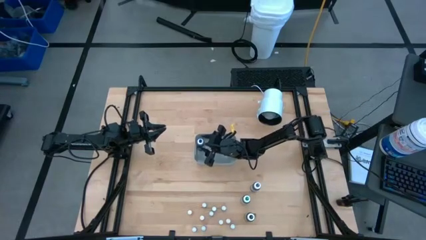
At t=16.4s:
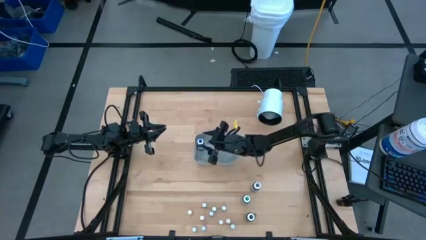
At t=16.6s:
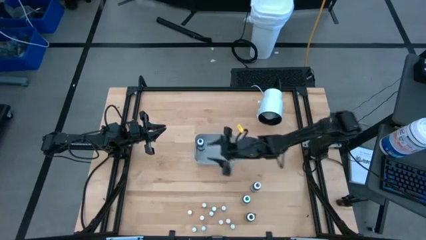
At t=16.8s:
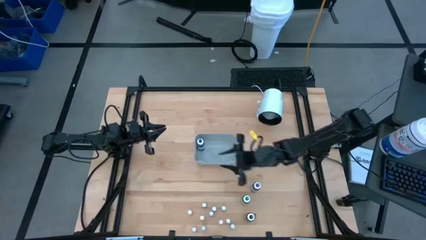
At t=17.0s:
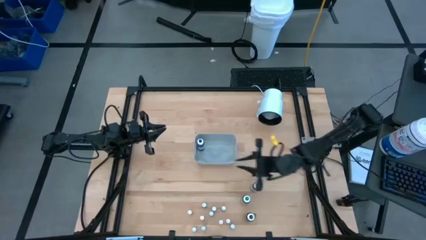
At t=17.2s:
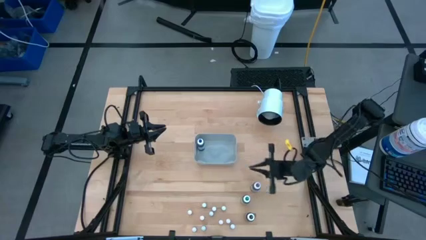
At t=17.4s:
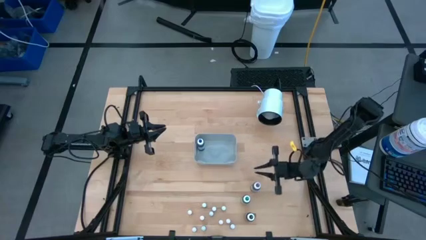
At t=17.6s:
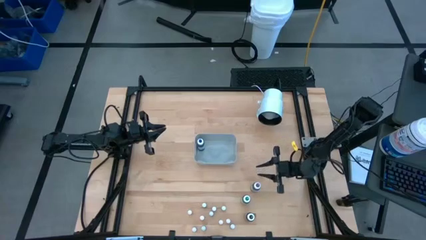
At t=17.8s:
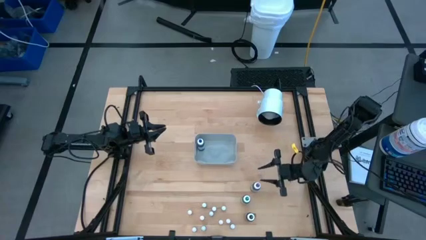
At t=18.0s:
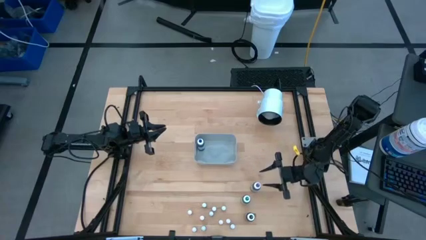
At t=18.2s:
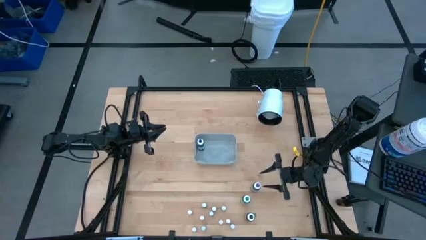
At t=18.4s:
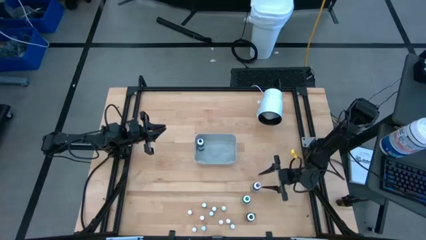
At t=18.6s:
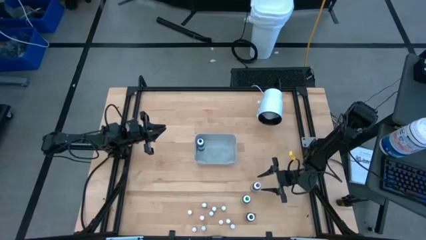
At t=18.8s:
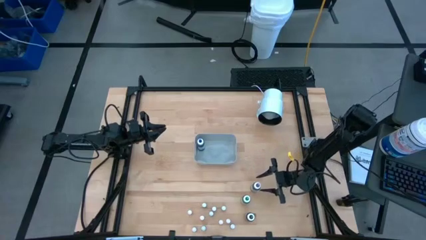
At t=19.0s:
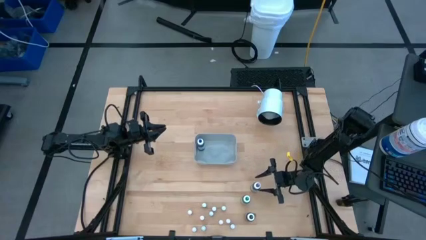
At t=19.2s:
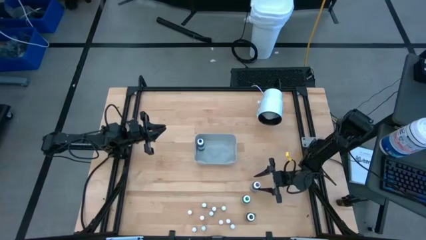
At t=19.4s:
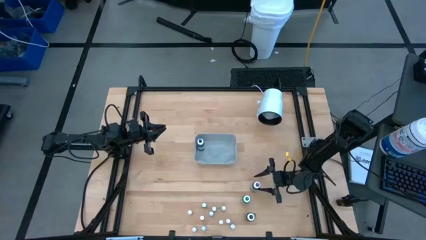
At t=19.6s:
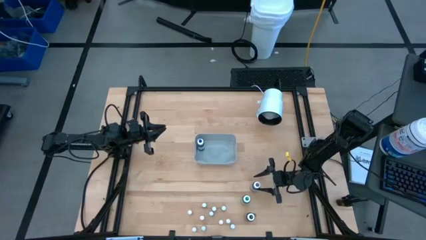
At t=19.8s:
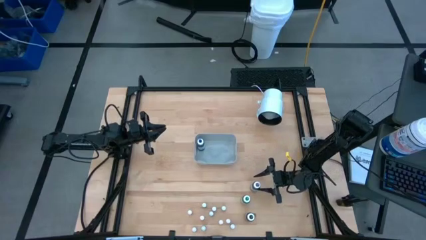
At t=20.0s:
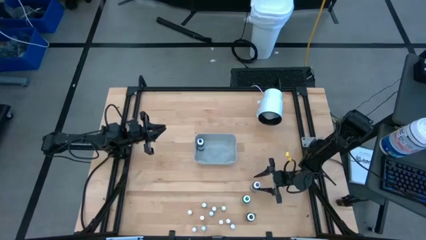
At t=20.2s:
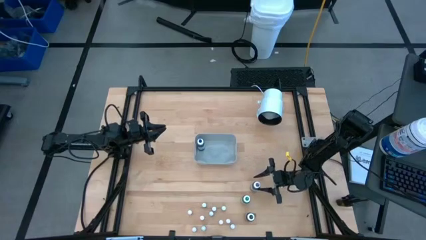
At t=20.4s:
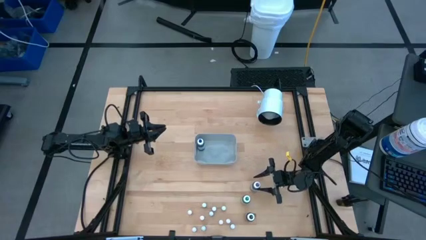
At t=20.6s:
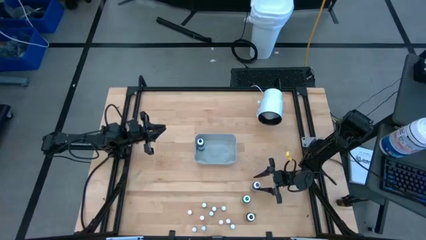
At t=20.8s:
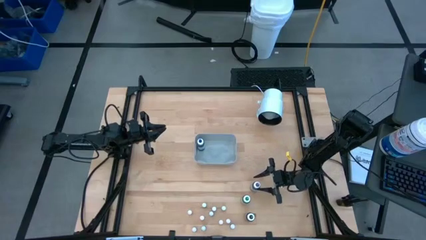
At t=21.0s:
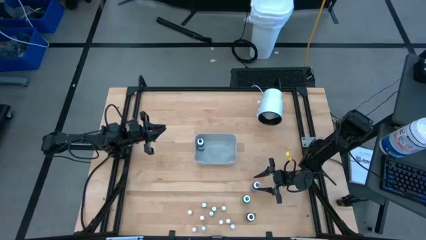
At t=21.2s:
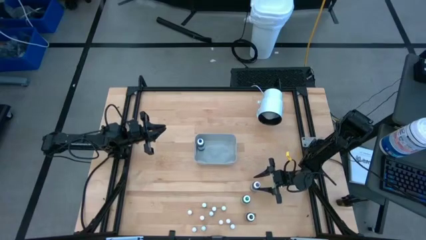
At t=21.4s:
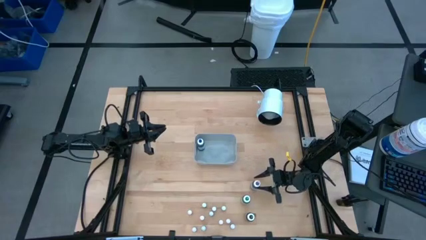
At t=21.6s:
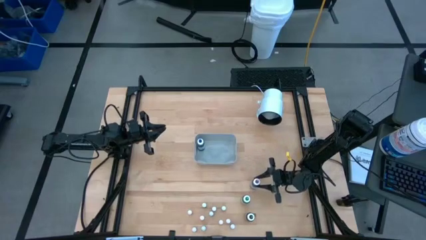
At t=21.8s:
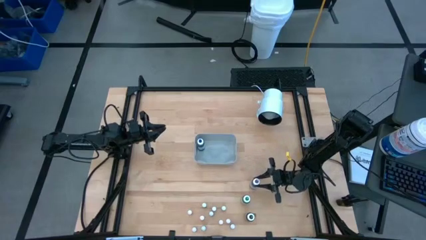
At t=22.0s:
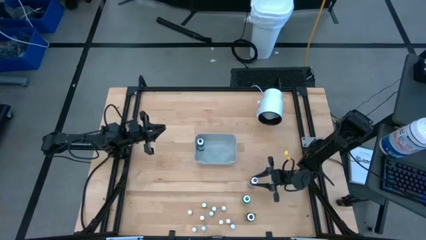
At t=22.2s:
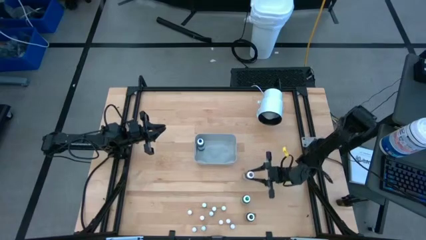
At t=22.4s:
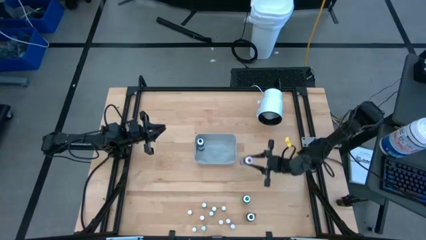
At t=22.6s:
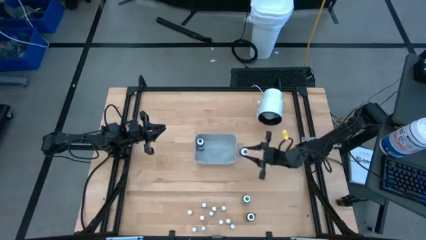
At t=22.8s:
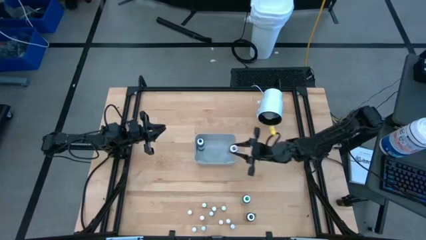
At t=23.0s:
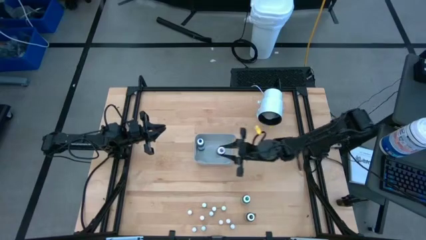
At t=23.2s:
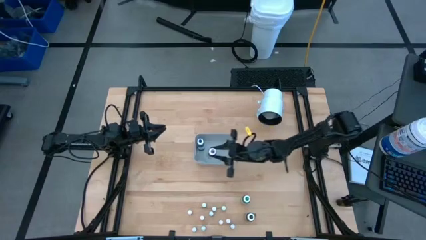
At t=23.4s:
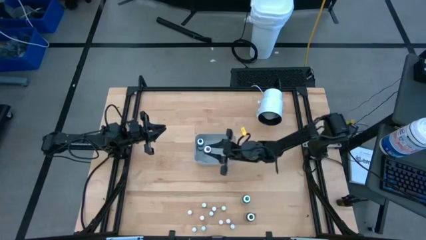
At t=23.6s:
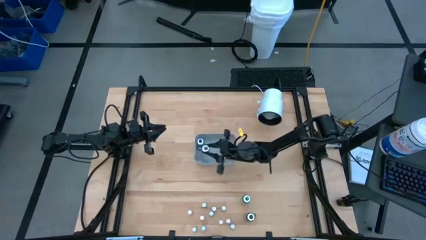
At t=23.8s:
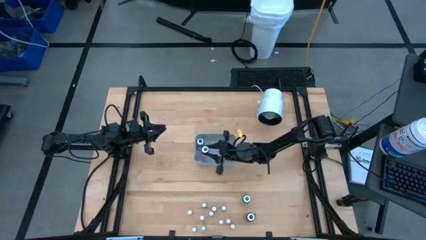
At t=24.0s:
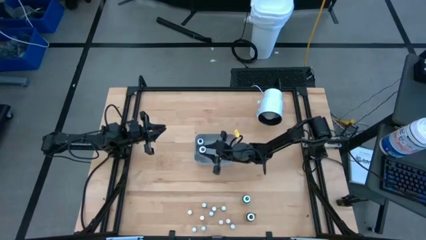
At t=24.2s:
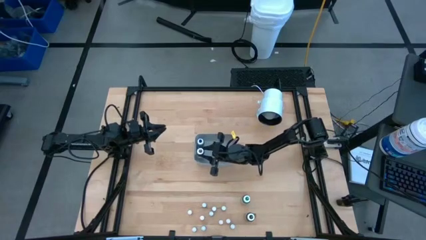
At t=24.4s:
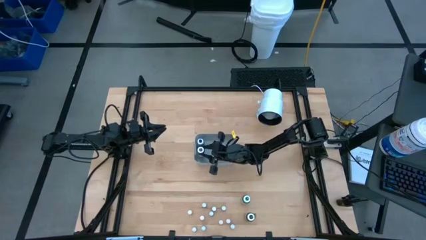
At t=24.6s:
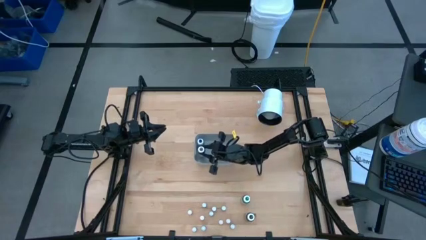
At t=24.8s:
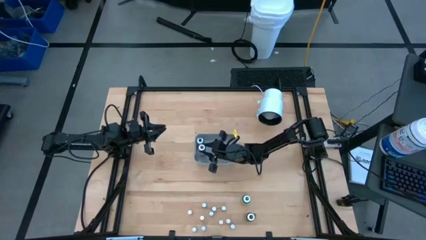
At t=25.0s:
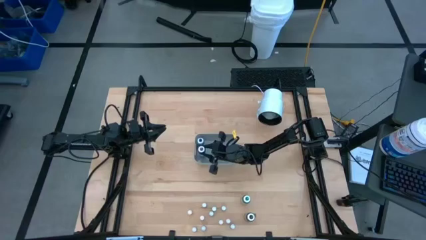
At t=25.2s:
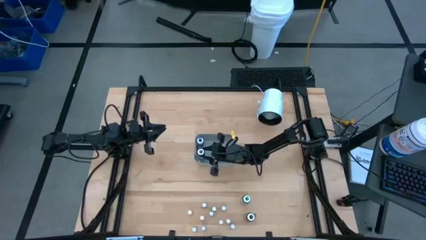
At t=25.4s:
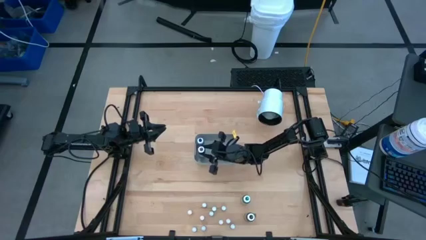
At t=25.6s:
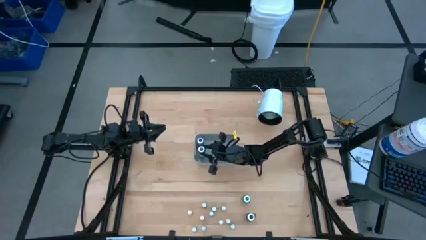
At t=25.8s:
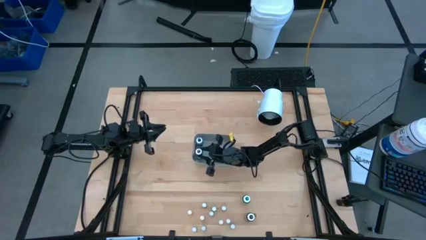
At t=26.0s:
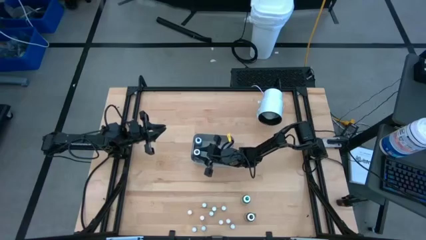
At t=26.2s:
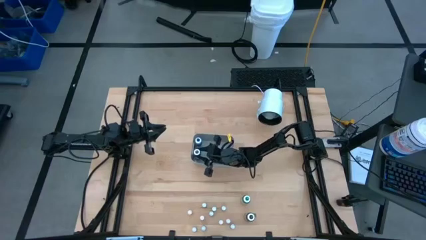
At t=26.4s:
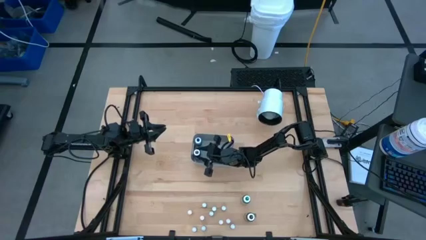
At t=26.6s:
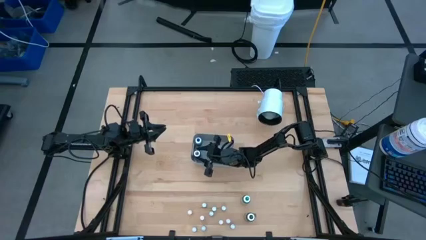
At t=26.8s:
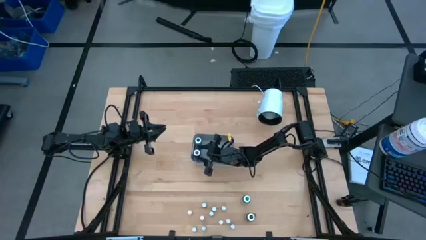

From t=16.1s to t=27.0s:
Task: Pick & Place food coloring
Put the big purple food coloring bottle into the gray bin
